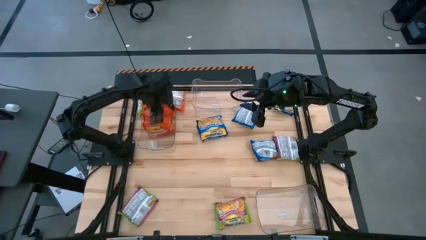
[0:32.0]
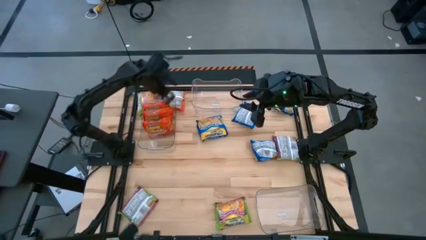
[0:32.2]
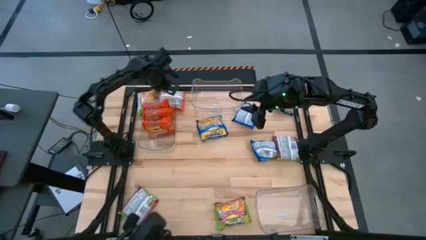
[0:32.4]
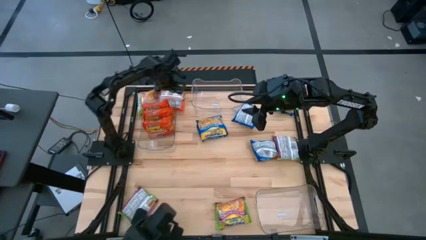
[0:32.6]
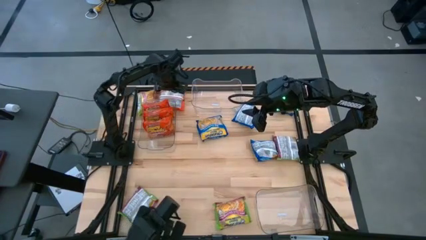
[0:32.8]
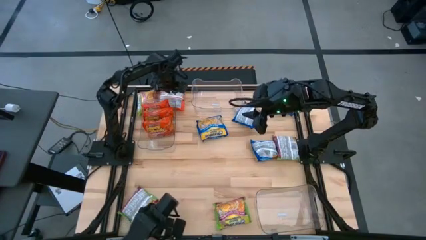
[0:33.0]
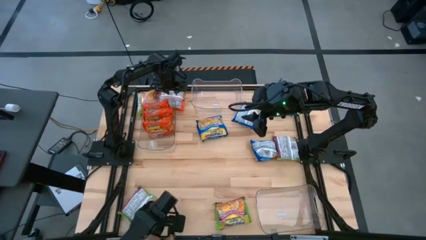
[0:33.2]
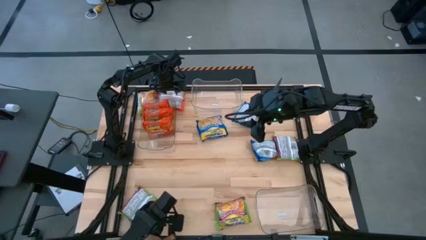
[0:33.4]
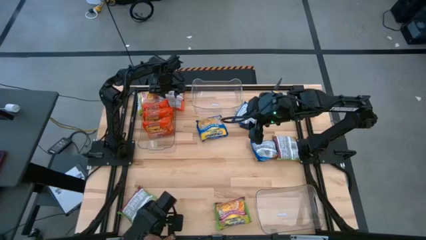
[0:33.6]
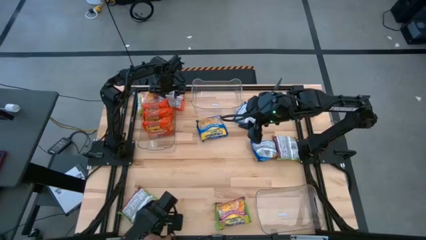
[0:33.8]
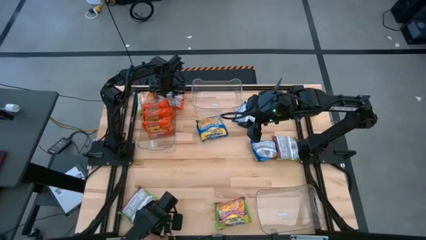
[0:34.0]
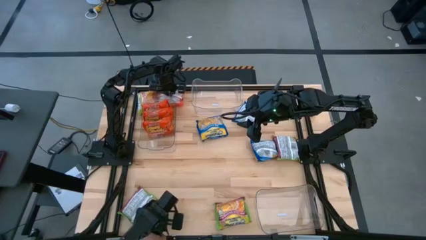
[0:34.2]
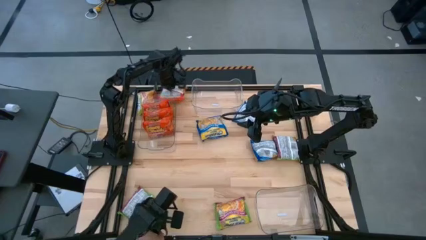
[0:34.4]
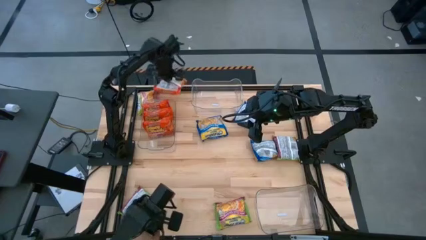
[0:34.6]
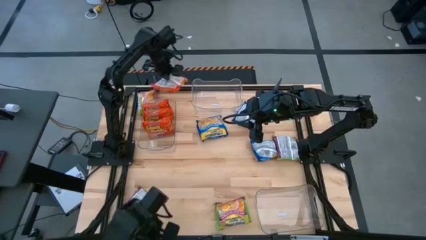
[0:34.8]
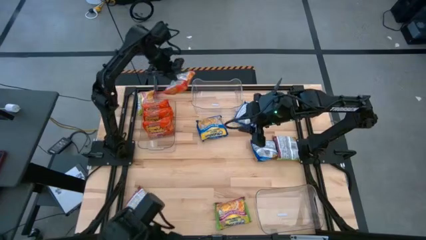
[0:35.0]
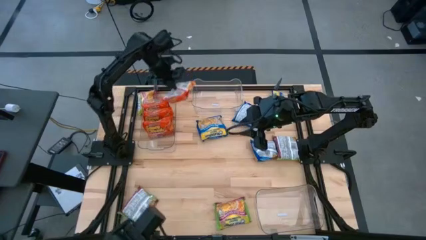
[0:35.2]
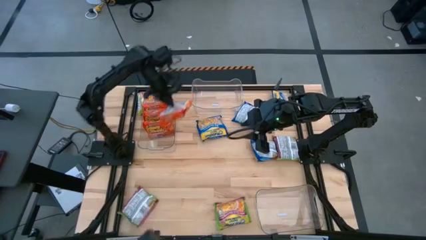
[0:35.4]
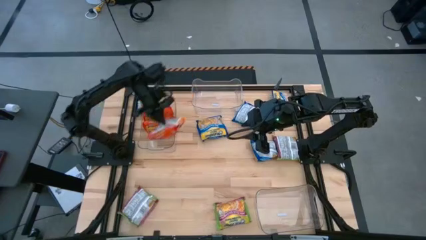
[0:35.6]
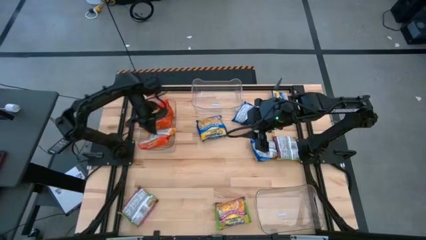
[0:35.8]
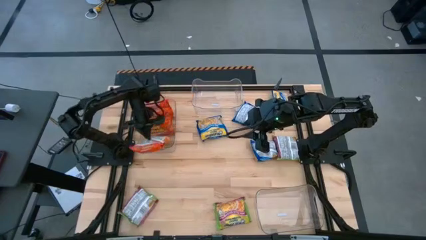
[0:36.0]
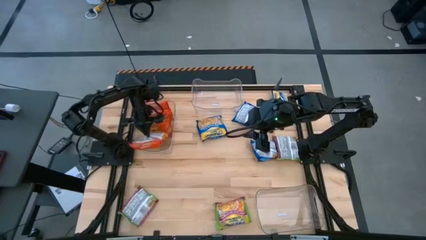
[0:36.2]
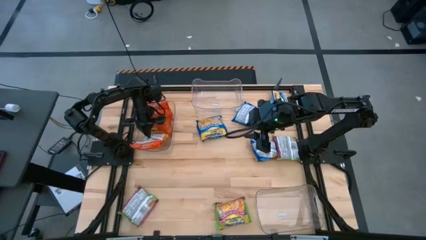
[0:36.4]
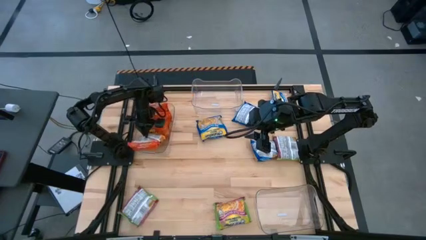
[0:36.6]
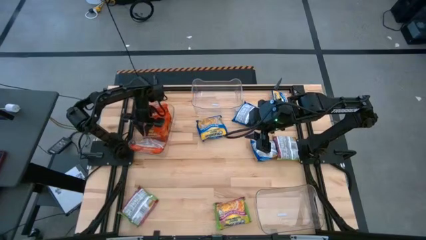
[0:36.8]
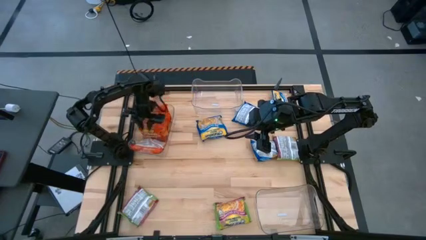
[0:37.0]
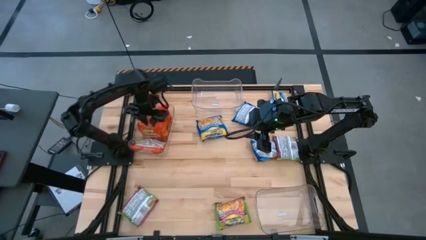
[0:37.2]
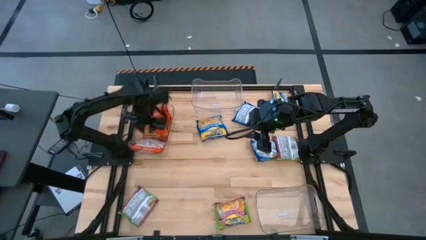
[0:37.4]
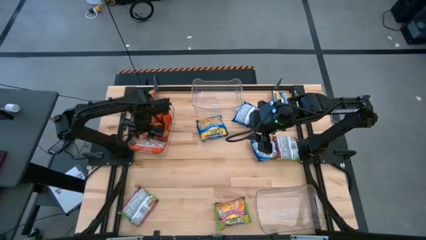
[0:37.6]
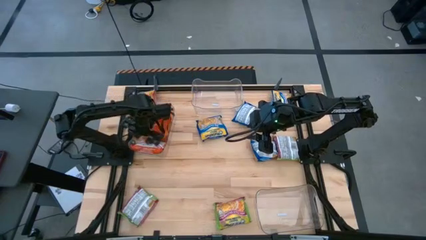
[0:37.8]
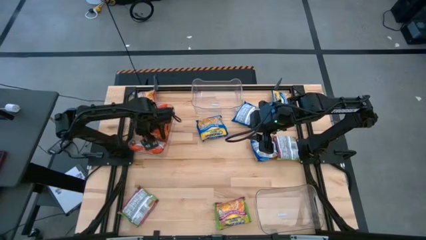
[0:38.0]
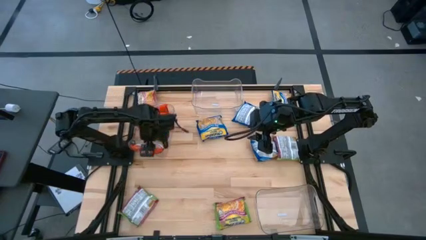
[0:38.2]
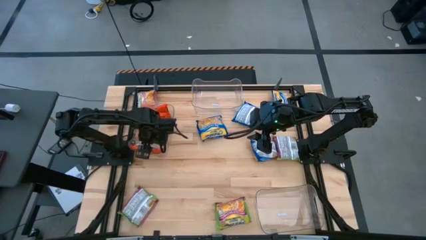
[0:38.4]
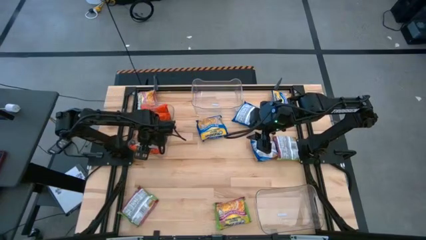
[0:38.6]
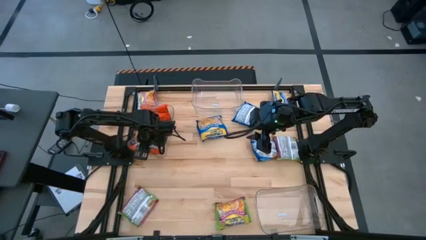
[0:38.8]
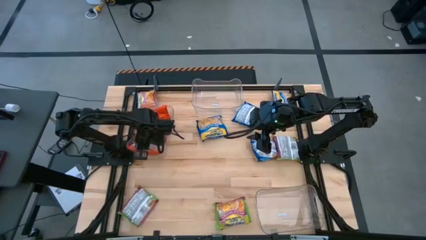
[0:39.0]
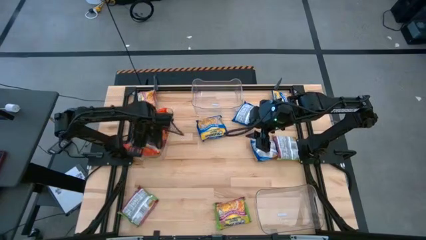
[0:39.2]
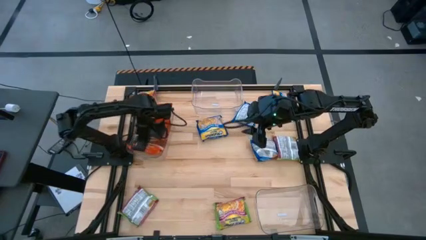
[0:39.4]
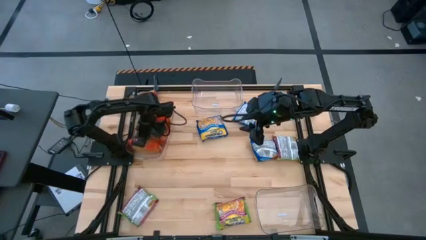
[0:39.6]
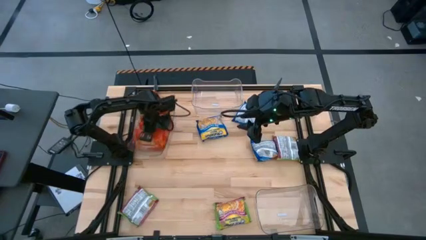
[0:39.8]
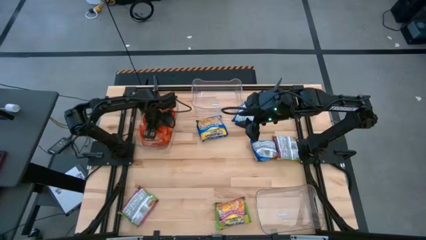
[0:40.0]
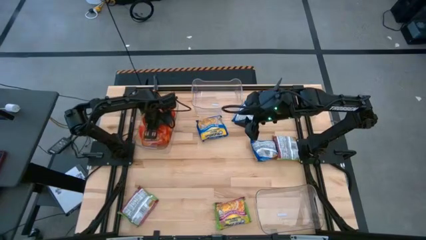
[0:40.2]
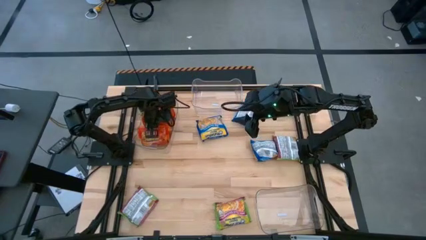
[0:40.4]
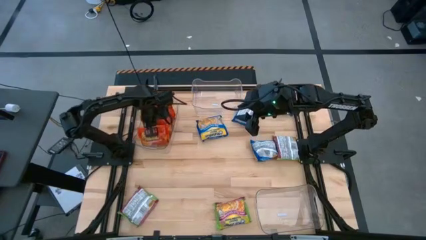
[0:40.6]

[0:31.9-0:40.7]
Task: Sort Maruchan noodles
Put the orange noodles into the left transparent bin

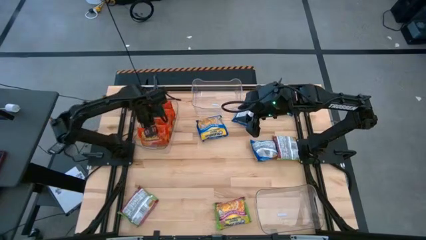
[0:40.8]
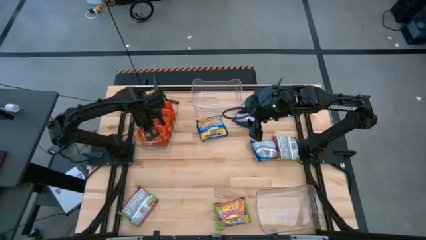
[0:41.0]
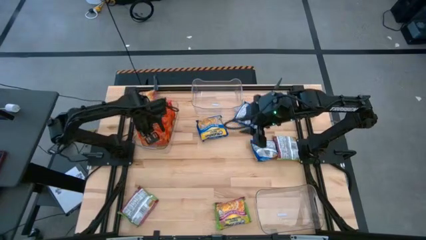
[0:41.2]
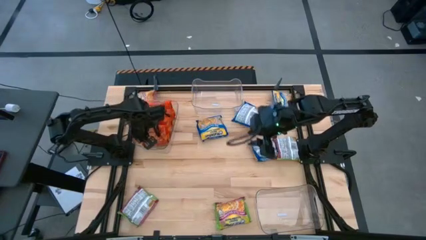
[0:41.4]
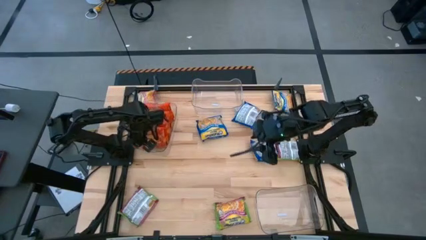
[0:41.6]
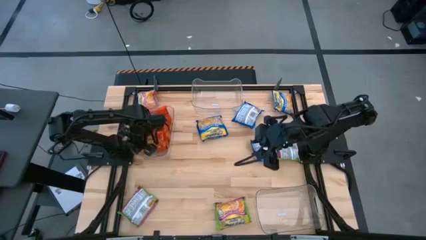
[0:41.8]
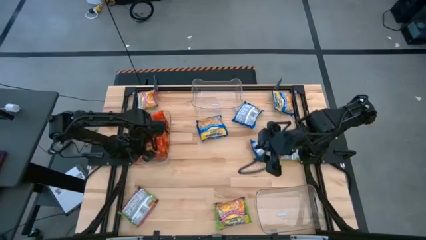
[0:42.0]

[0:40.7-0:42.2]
Adjust the left transparent bin

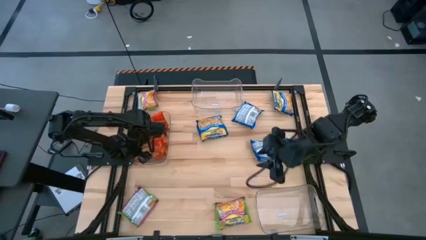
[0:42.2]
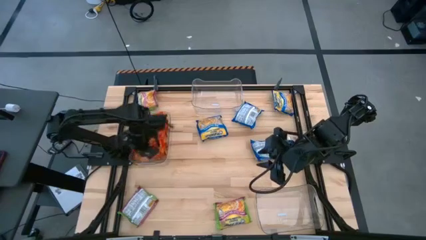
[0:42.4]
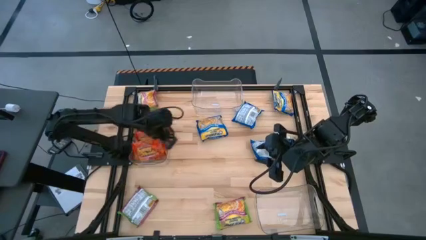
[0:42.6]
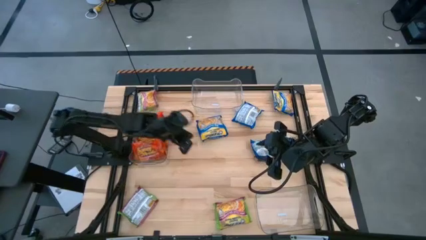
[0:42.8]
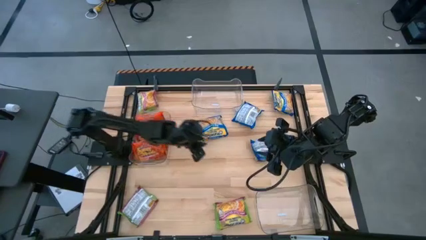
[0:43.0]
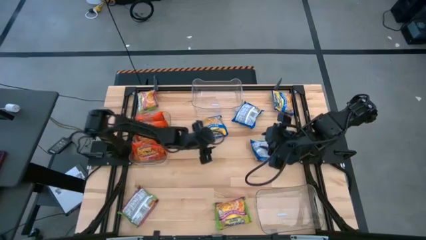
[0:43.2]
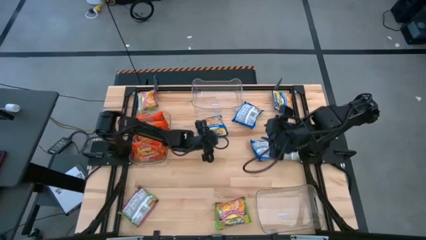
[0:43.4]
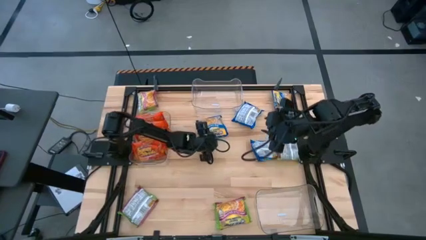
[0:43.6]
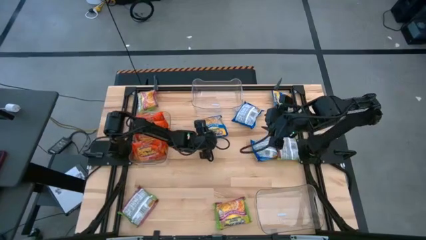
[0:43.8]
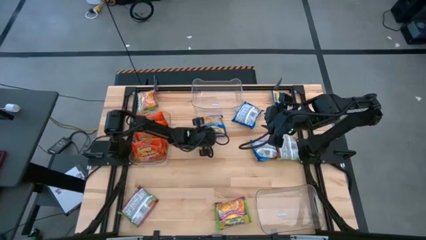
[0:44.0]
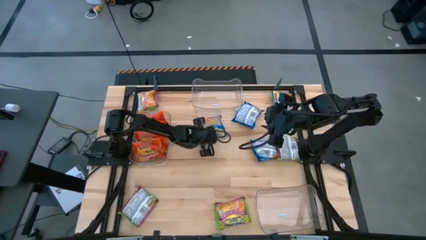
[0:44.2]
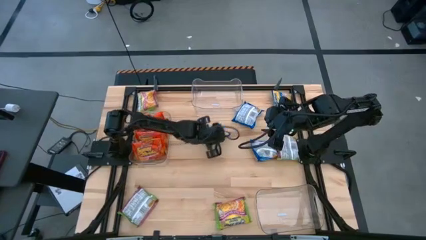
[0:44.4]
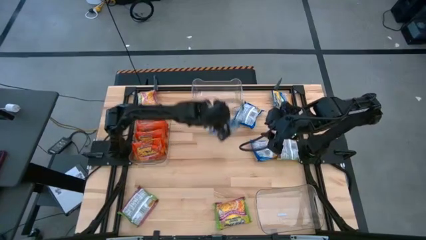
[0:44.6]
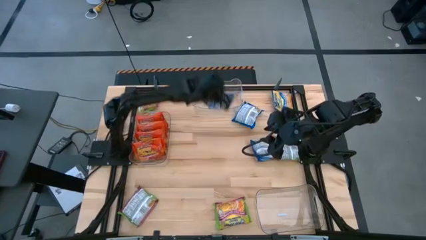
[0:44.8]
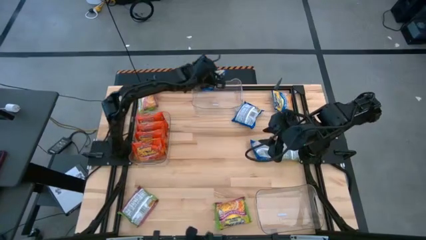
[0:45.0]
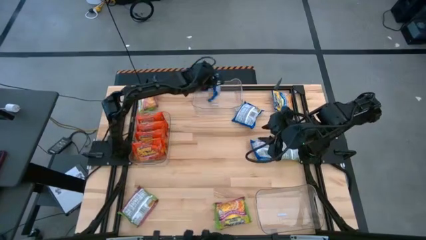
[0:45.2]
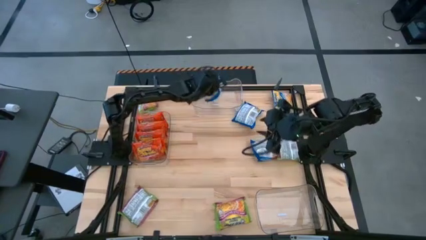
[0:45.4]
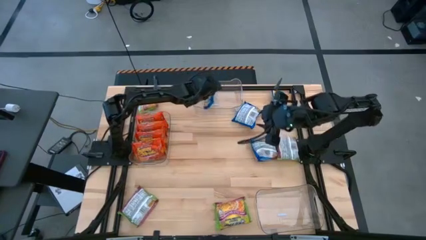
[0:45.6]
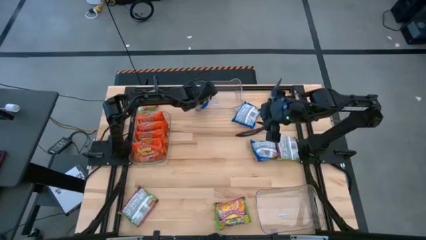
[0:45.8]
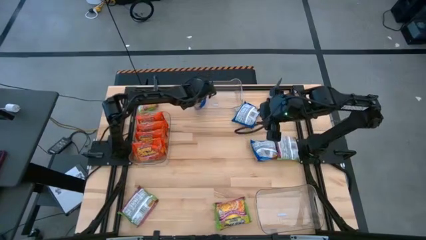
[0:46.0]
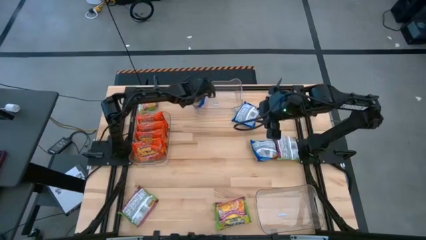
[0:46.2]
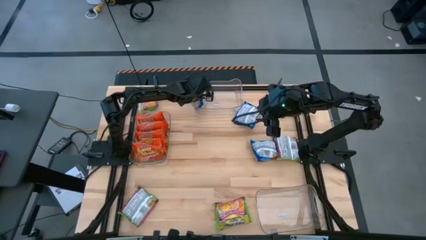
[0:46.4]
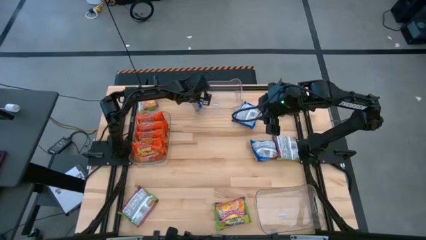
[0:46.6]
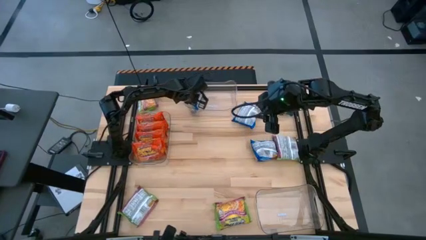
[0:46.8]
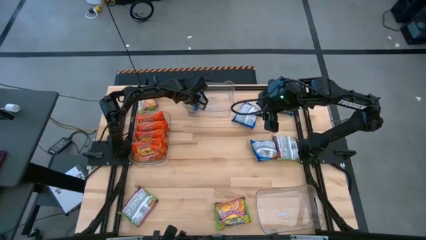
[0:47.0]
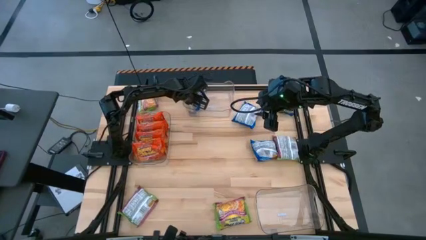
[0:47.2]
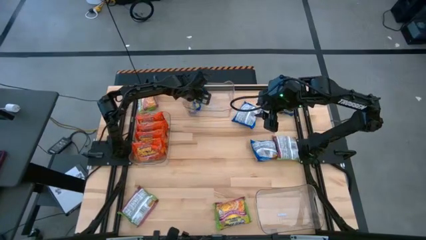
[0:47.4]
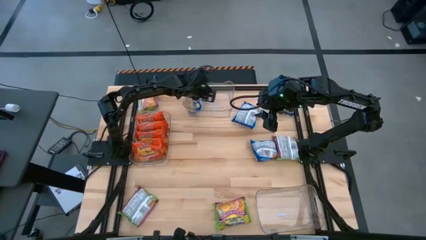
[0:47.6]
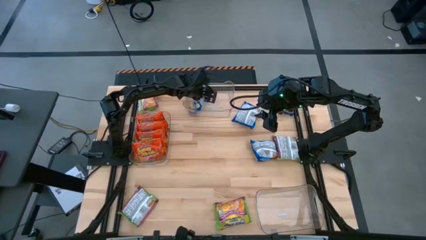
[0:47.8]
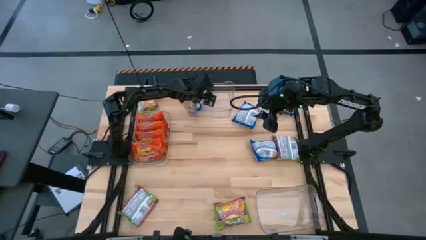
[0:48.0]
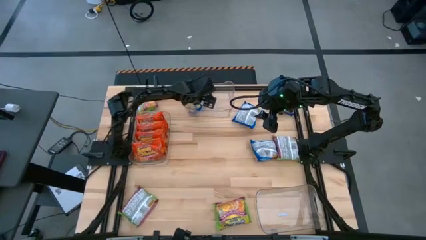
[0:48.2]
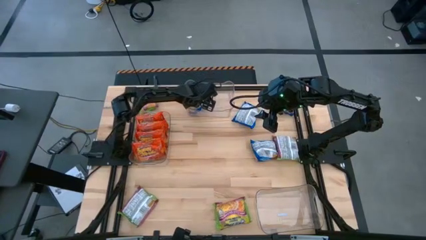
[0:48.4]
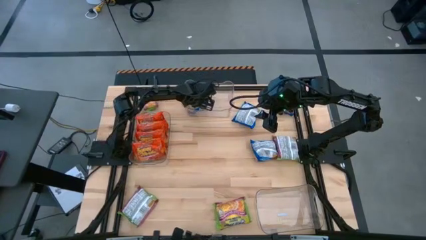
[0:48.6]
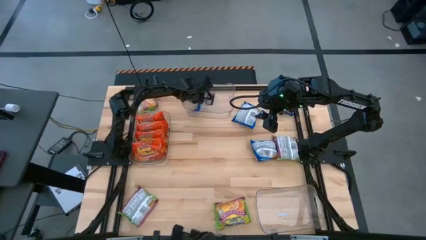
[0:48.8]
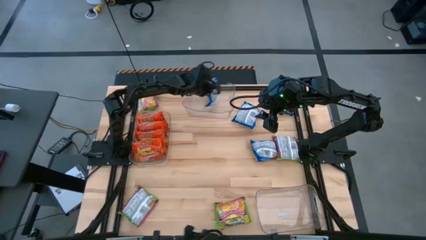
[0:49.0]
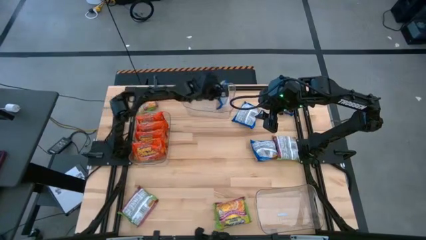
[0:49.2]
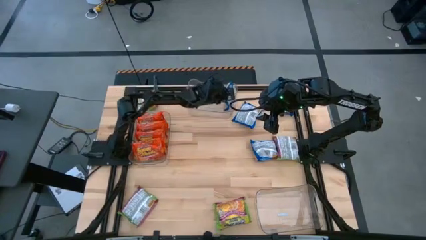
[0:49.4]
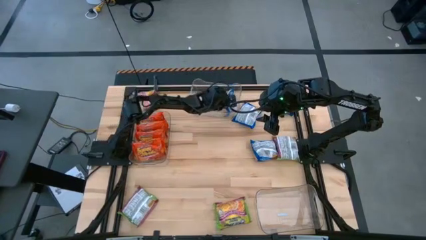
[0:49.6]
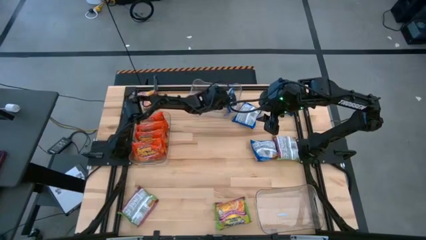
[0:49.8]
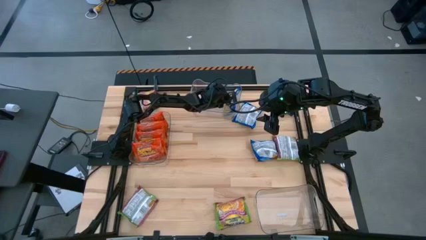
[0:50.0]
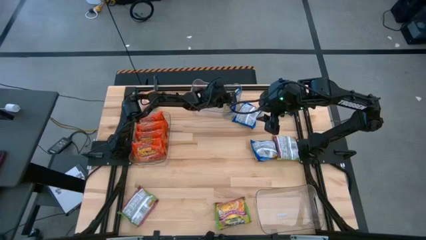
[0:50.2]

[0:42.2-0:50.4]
Put the blue noodles into the middle transparent bin
